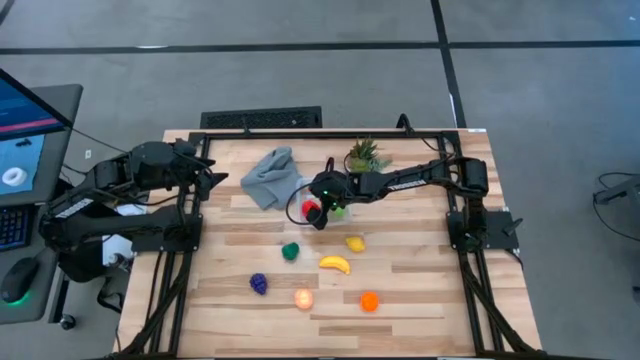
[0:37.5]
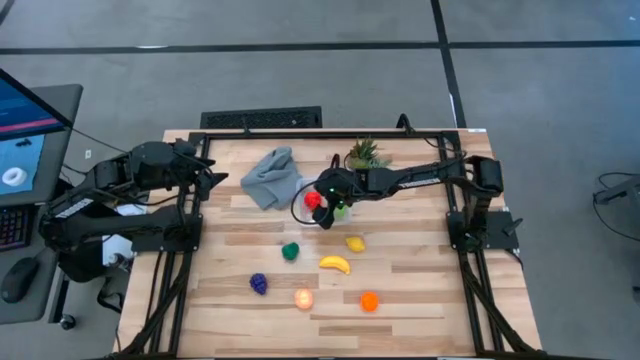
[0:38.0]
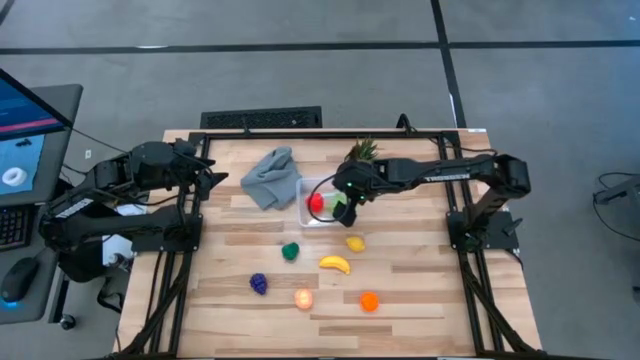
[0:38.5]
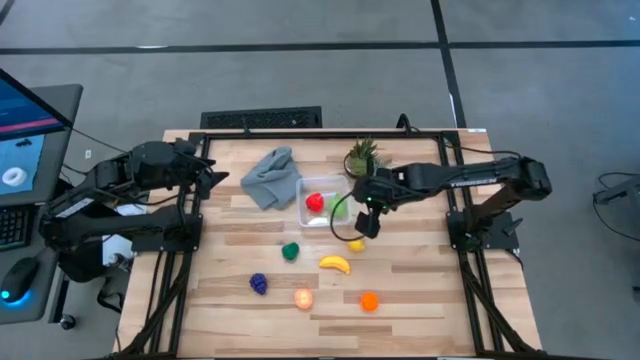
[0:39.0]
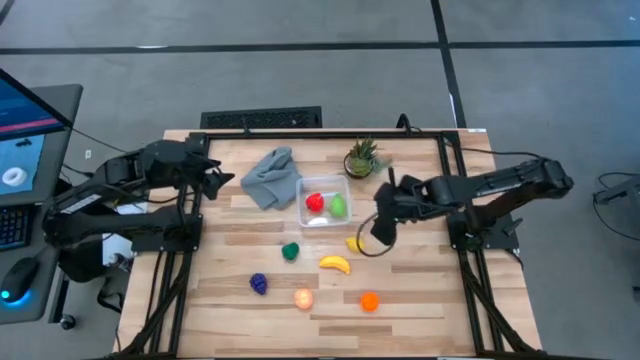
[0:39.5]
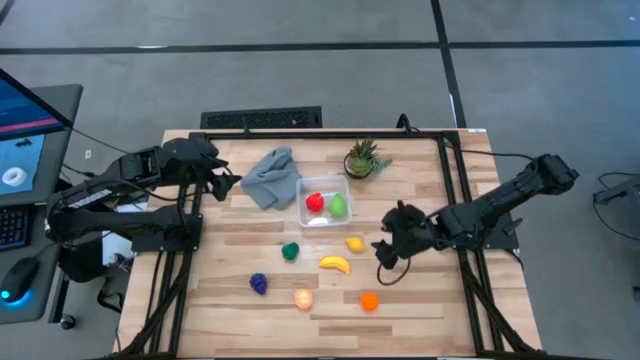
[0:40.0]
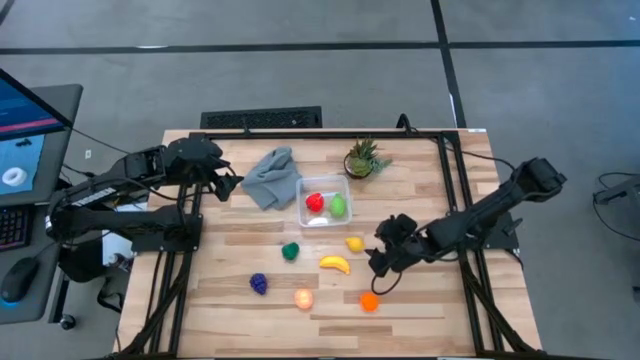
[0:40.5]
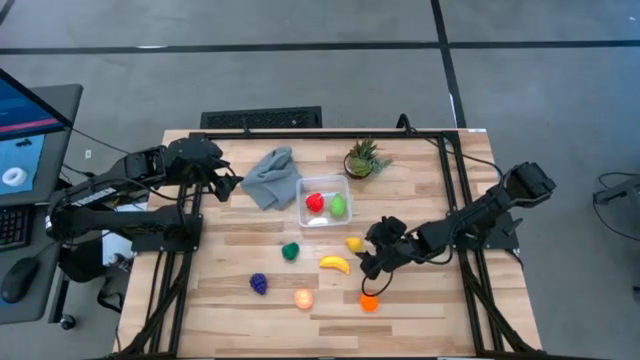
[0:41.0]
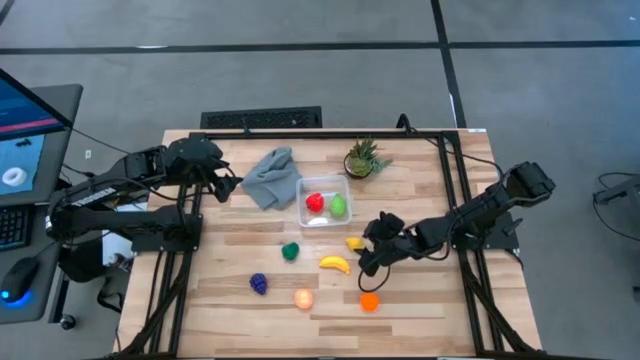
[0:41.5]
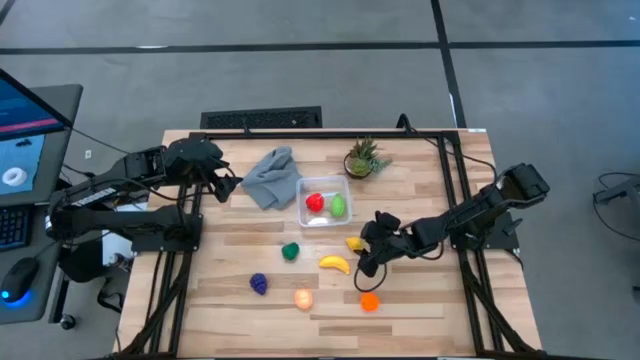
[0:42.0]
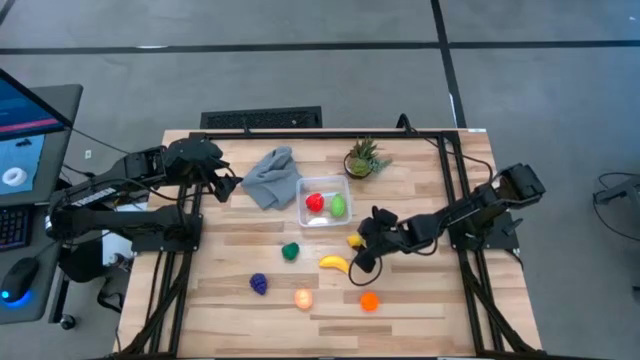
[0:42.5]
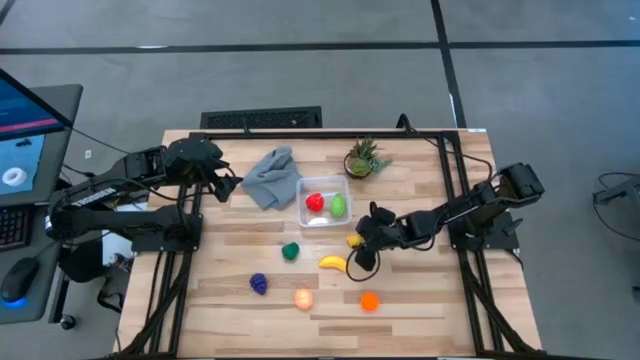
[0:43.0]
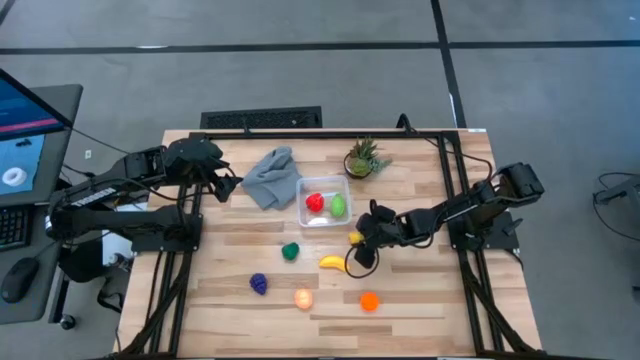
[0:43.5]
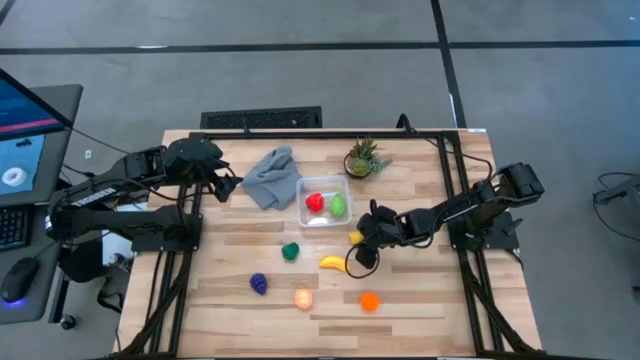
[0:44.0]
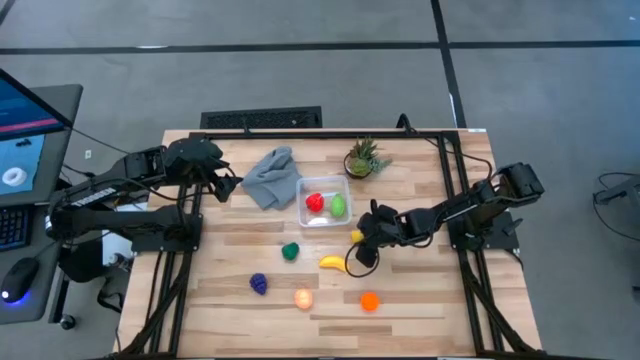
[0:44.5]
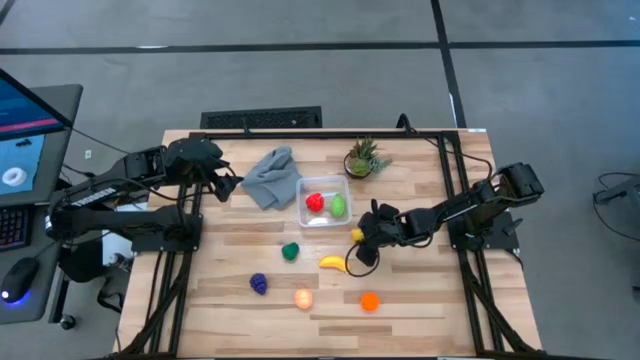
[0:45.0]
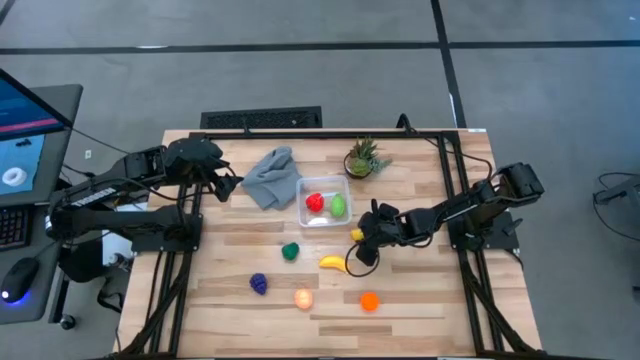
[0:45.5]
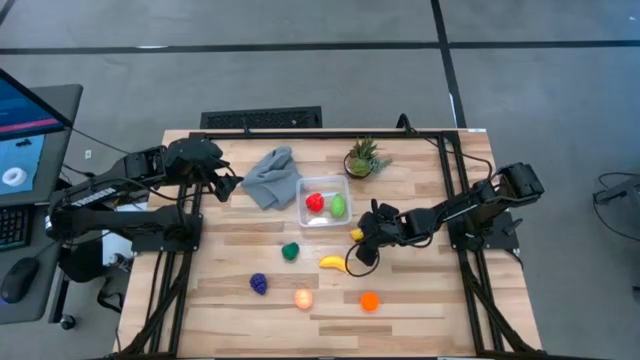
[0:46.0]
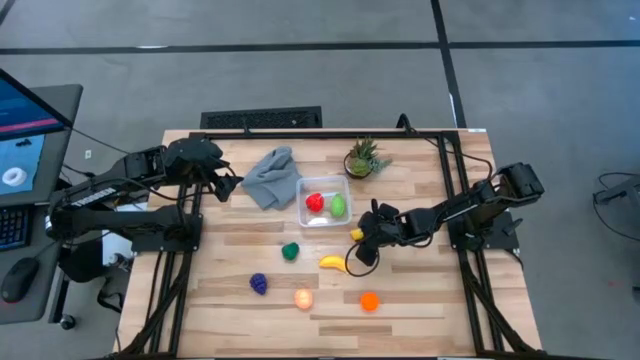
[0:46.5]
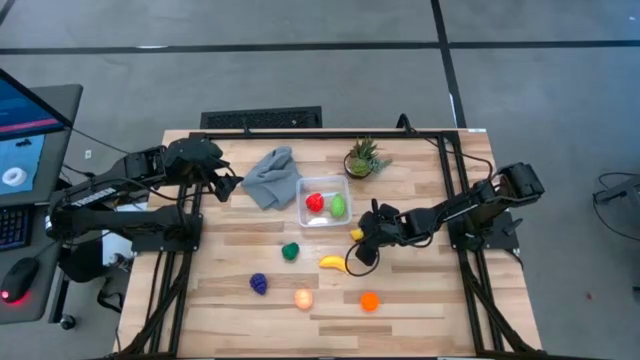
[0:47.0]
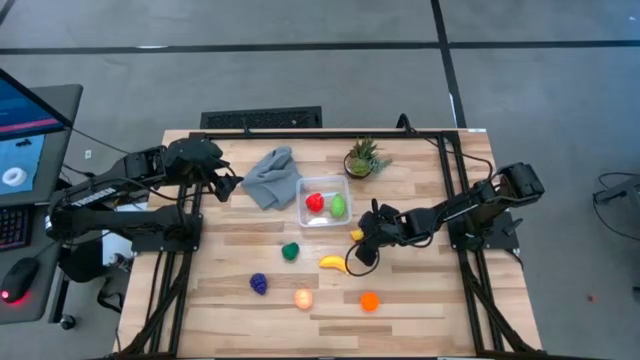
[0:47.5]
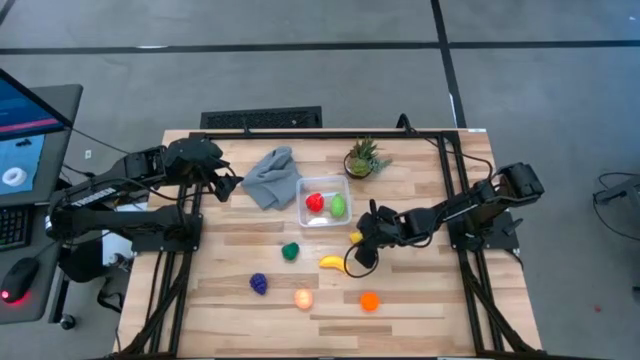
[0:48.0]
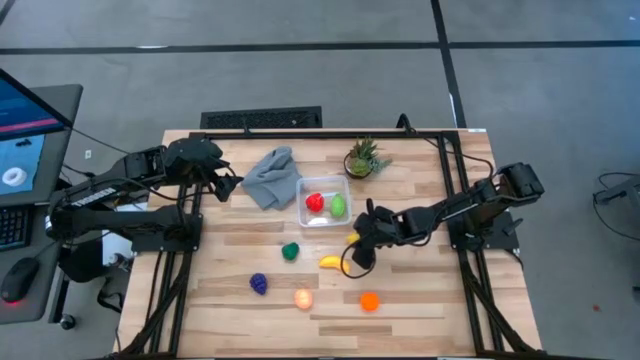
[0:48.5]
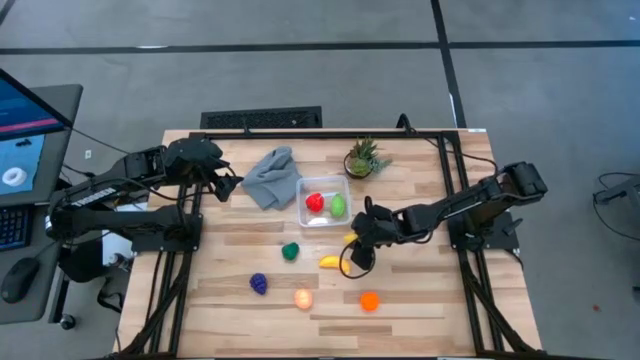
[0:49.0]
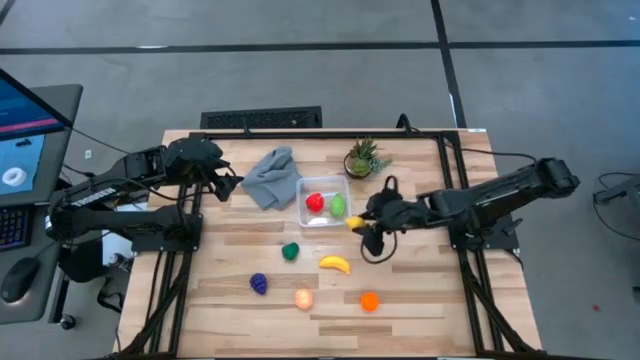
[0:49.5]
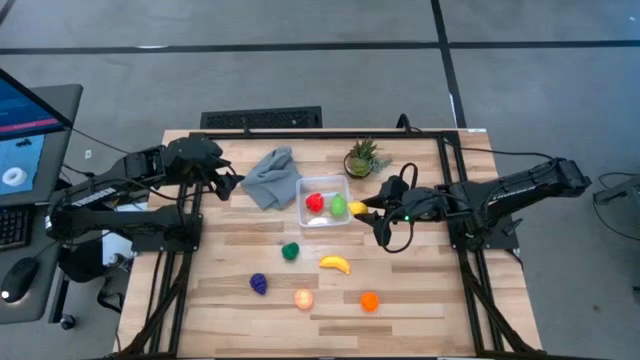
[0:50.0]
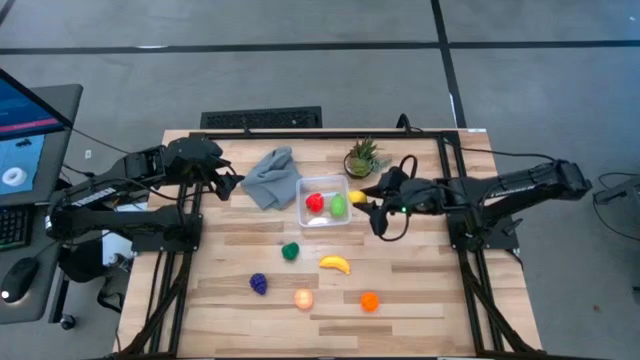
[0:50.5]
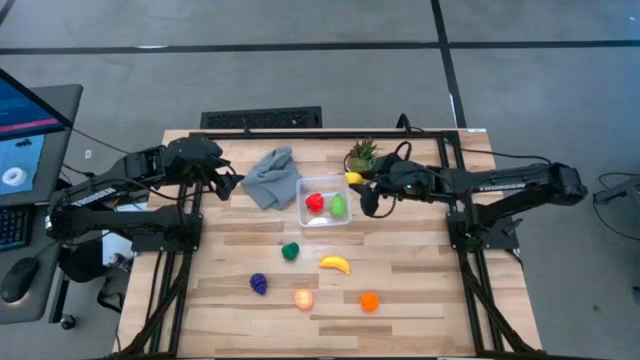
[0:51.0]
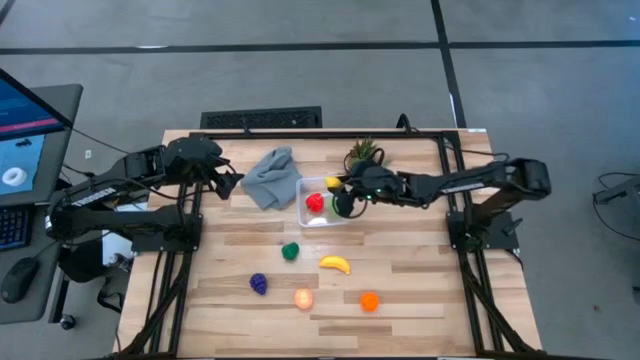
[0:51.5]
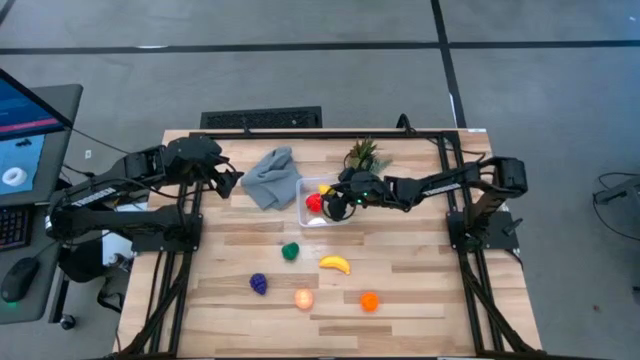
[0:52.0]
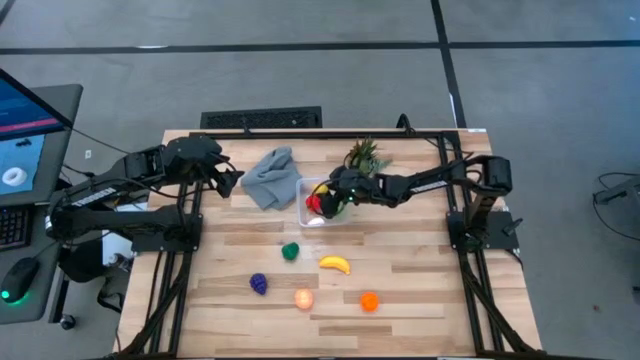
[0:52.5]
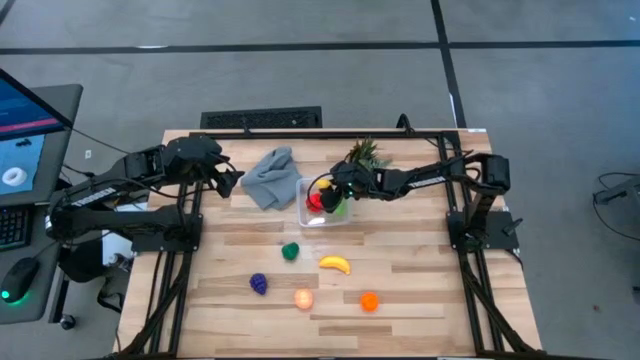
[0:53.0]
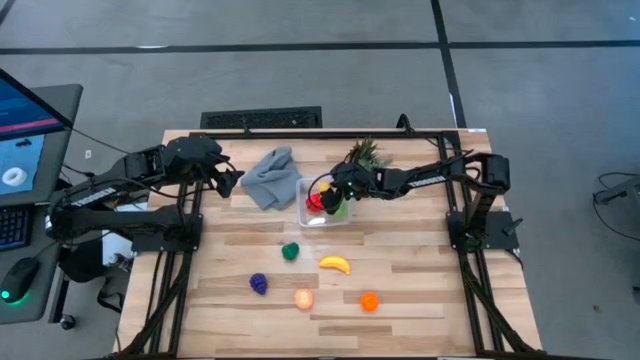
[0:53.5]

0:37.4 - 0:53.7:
Task: Pick and placing Produce into tupperware
Put the yellow lemon into the transparent bin

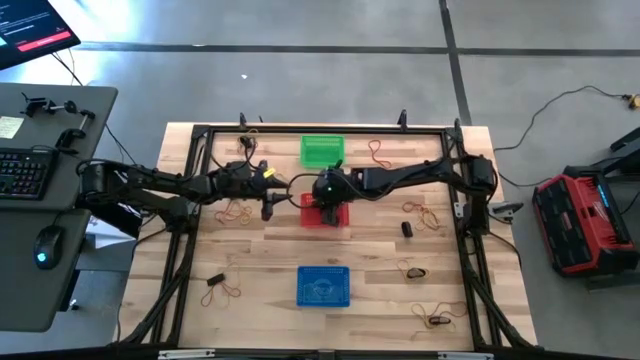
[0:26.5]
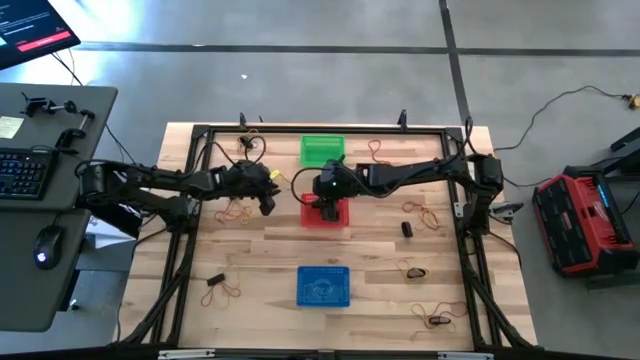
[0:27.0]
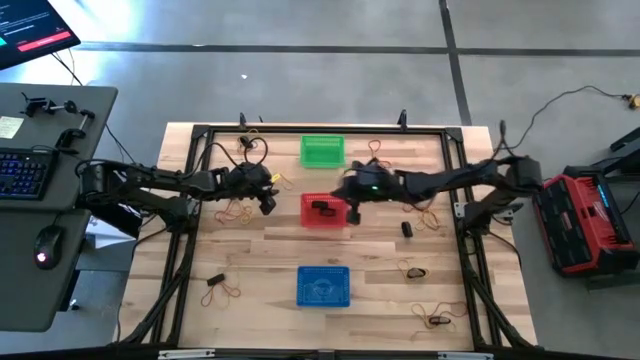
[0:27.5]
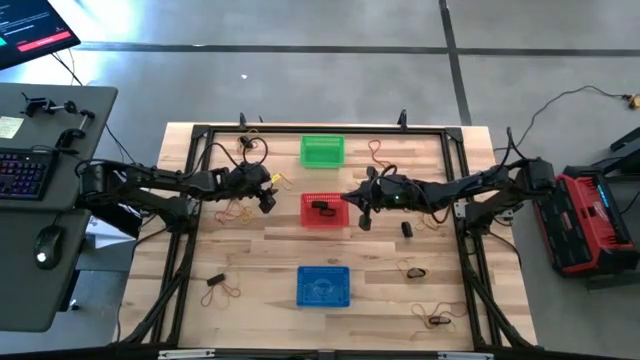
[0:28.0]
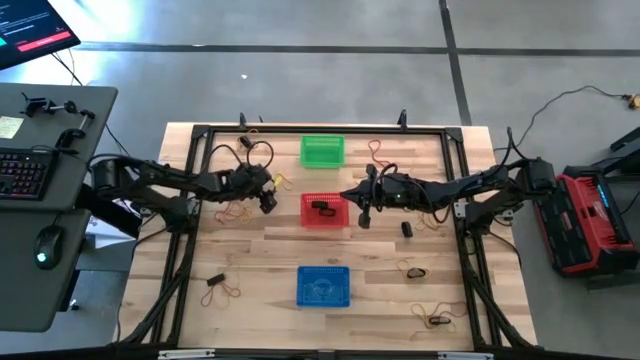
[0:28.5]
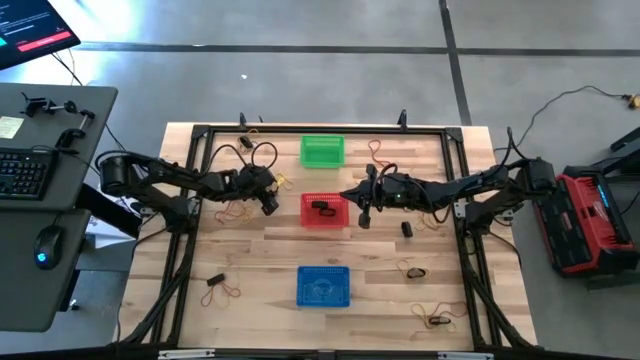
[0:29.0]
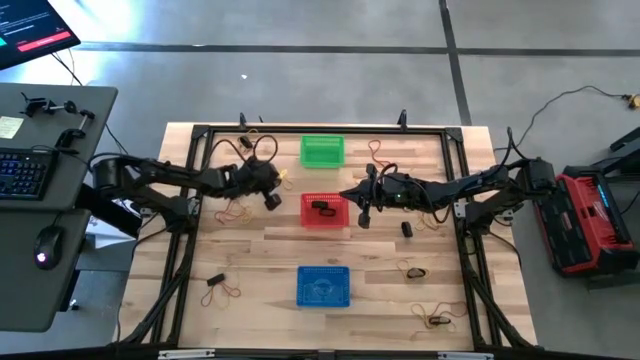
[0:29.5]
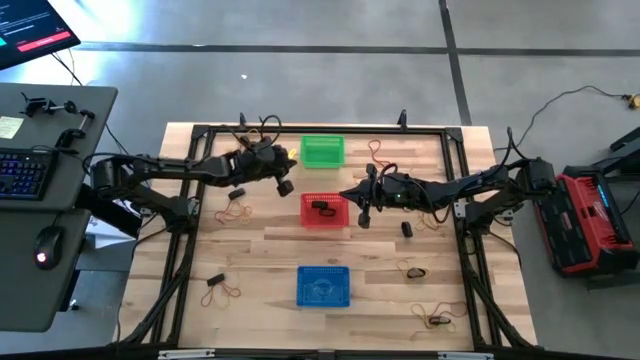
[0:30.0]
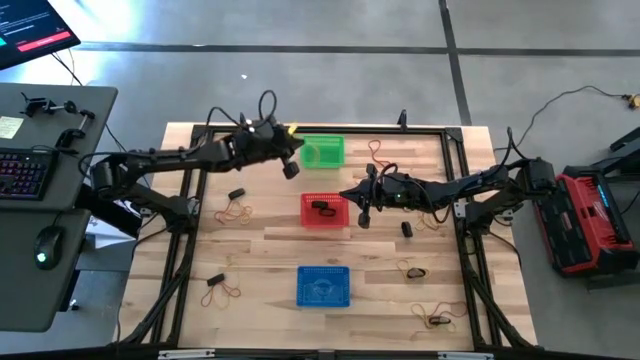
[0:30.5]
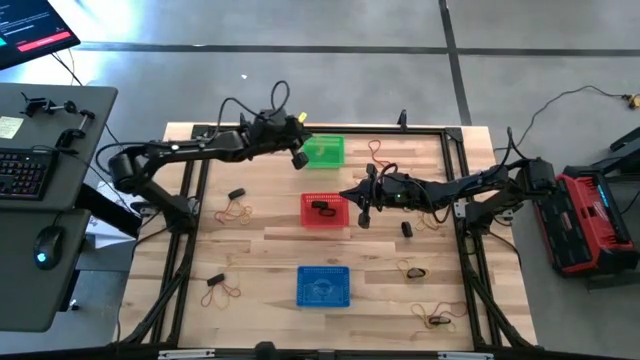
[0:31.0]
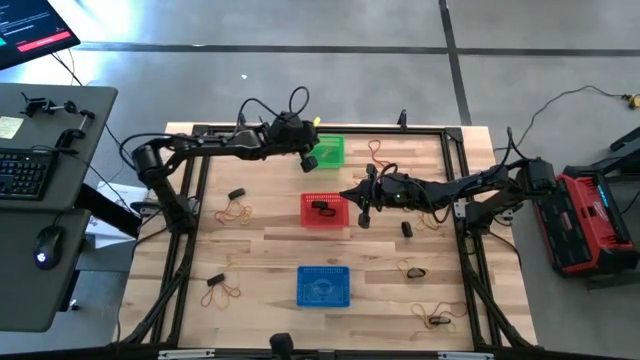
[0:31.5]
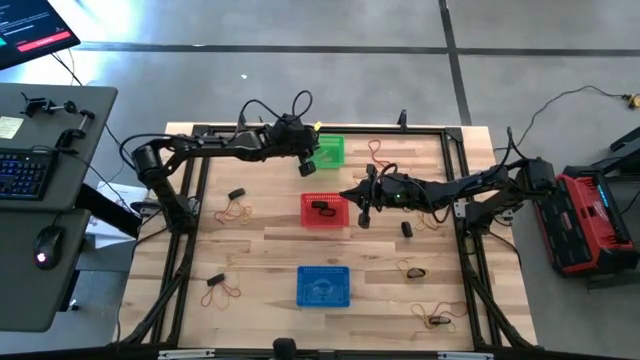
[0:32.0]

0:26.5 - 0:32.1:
Task: Sort rubber bands into baskets
Put the yellow rubber band into the green bin
